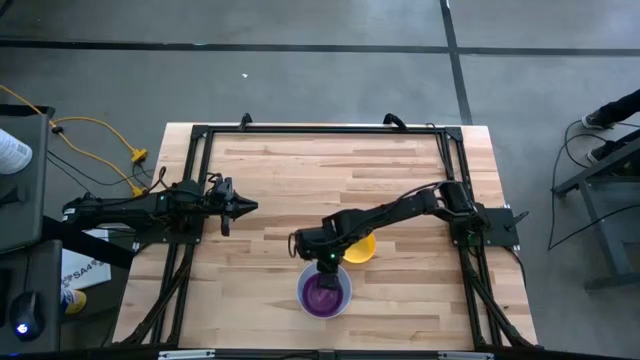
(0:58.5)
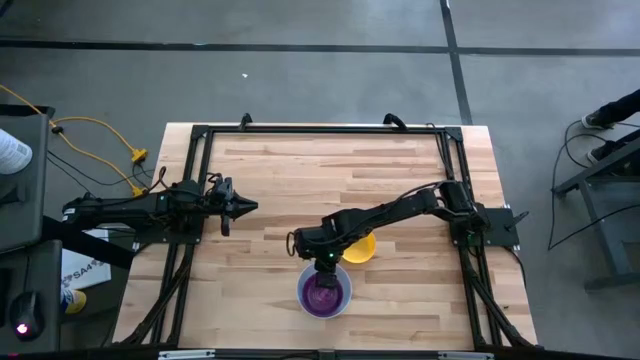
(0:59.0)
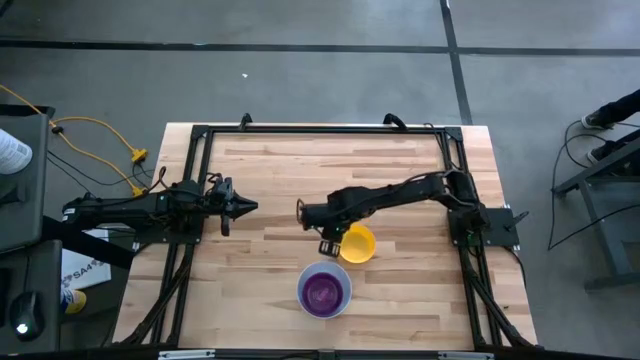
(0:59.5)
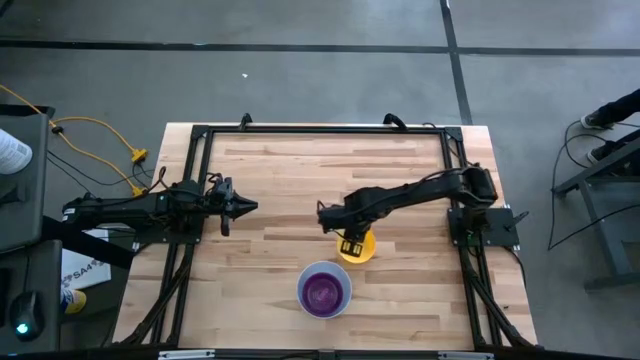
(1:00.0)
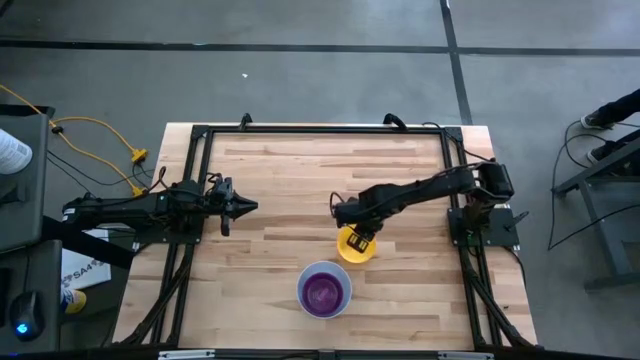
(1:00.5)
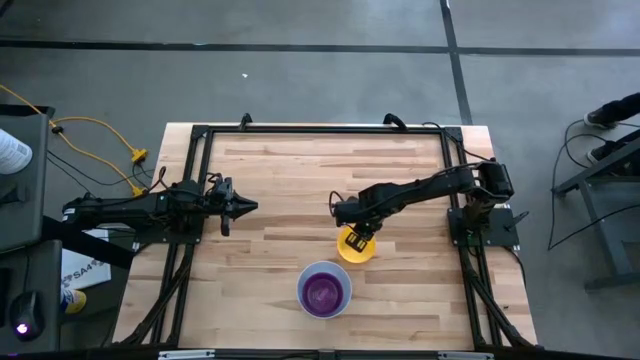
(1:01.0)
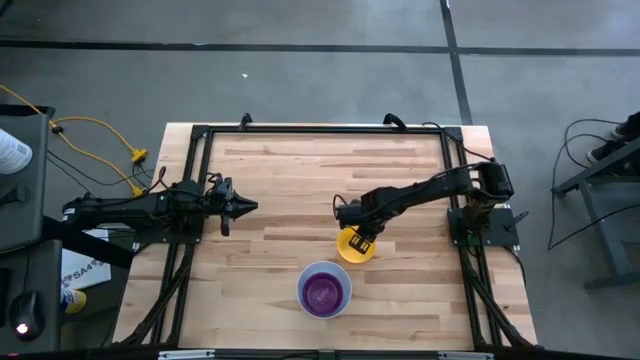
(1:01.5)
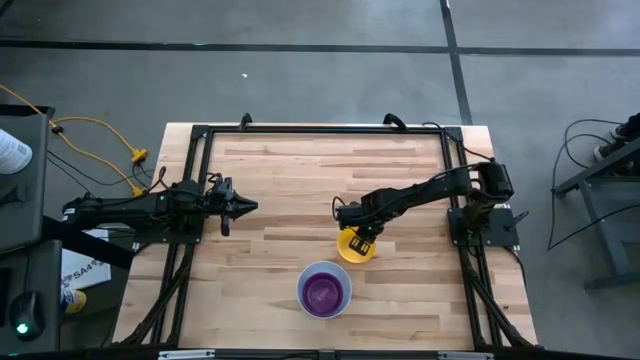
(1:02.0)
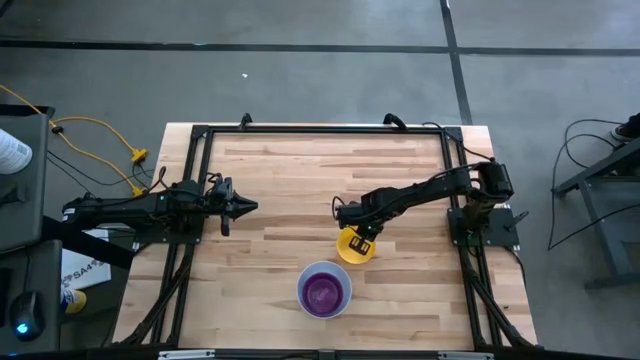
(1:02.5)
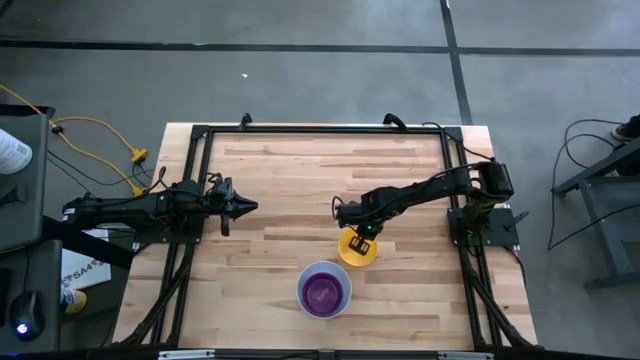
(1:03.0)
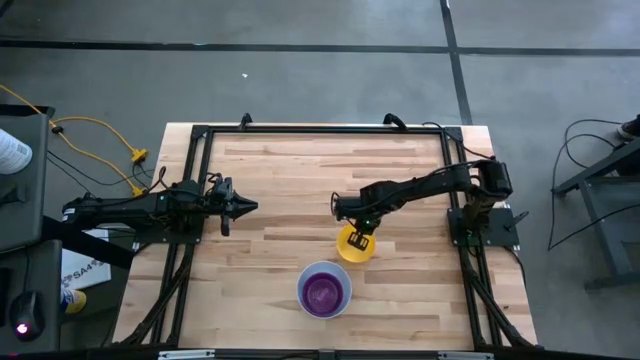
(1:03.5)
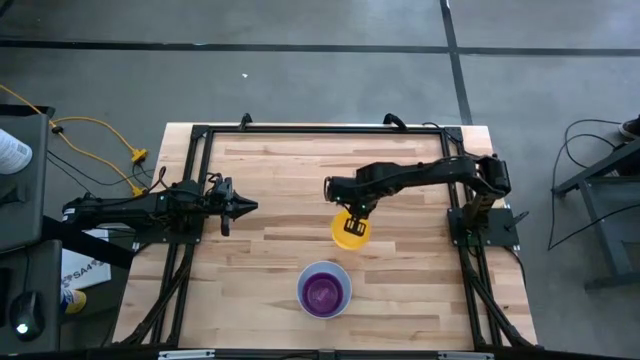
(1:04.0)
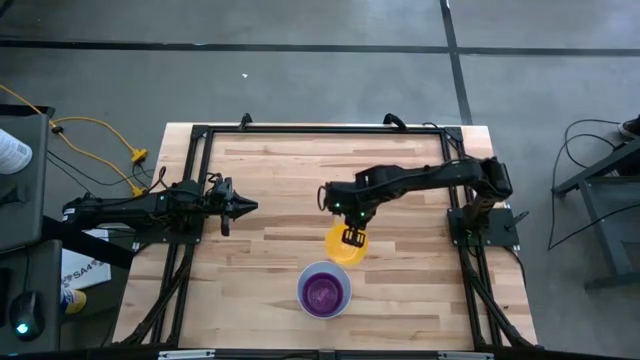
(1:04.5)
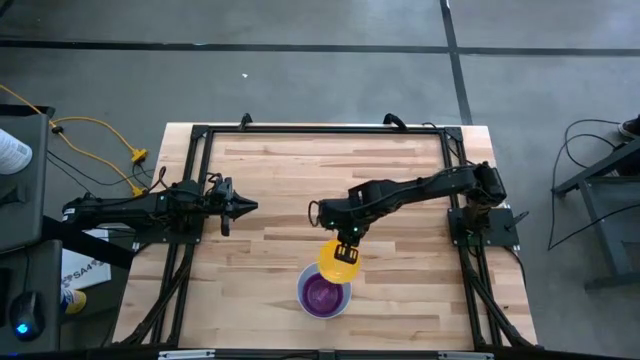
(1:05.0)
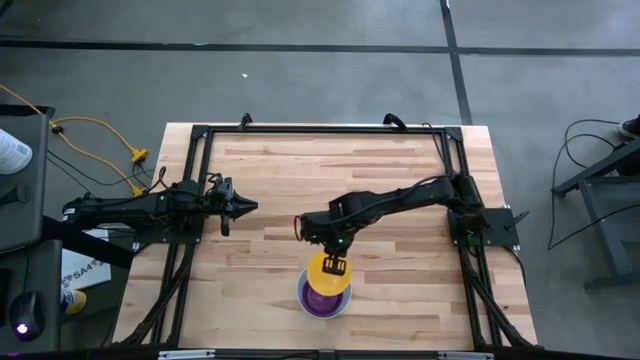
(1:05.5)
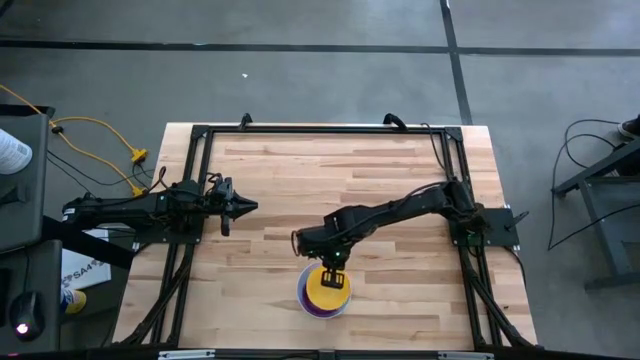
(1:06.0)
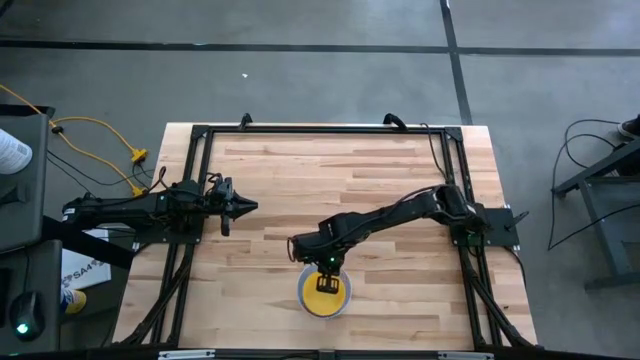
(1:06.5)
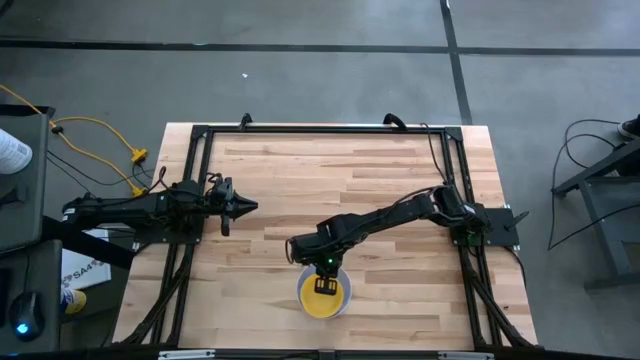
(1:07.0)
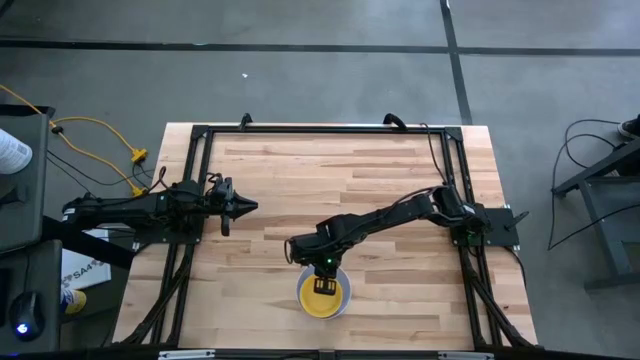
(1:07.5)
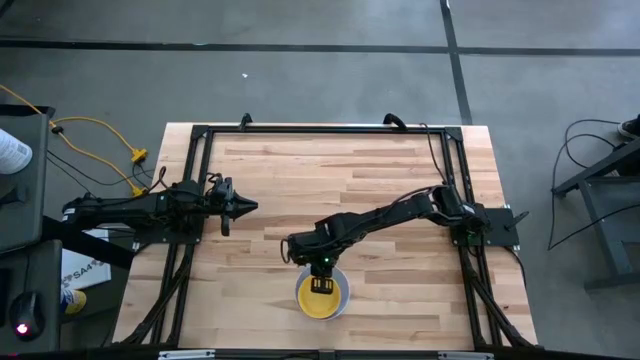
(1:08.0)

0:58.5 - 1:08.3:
Stack the yellow bowl on top of the purple bowl

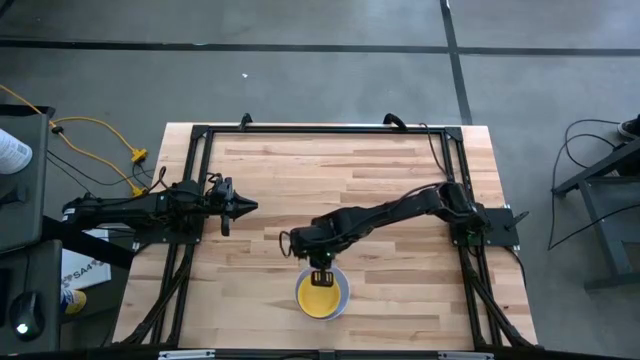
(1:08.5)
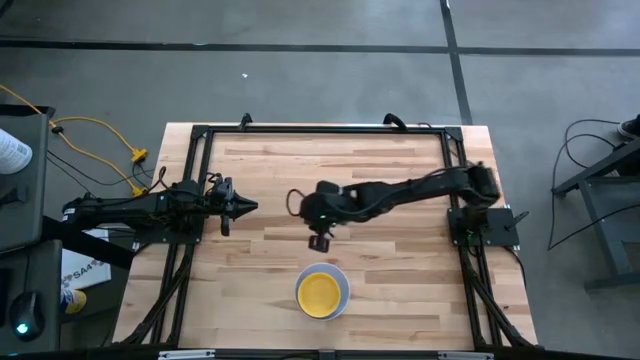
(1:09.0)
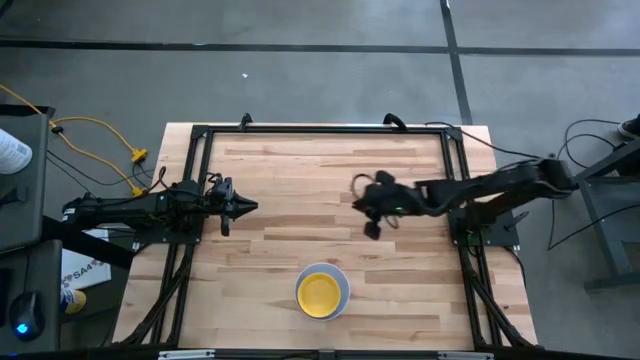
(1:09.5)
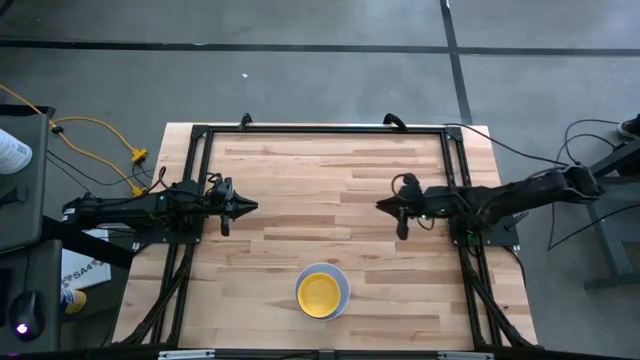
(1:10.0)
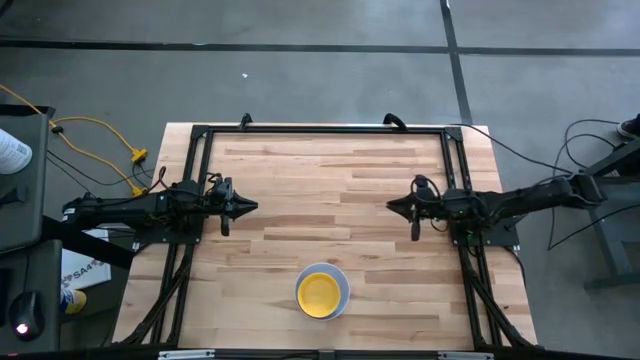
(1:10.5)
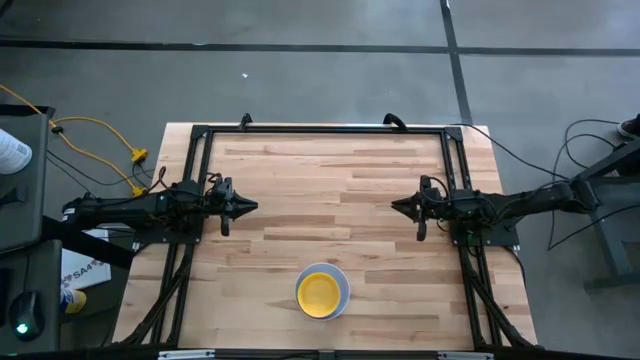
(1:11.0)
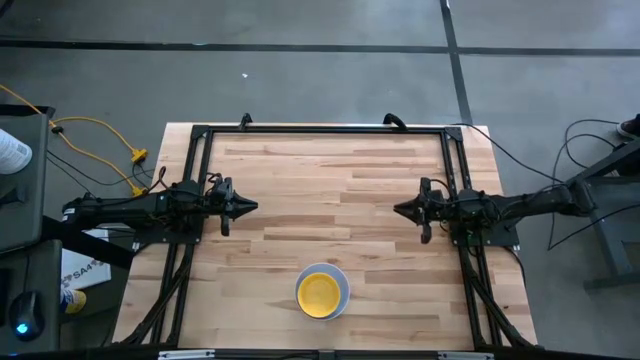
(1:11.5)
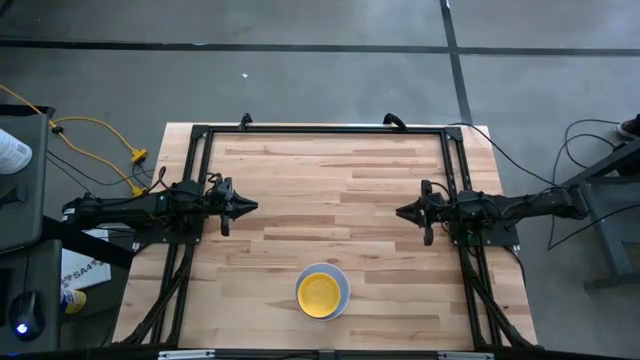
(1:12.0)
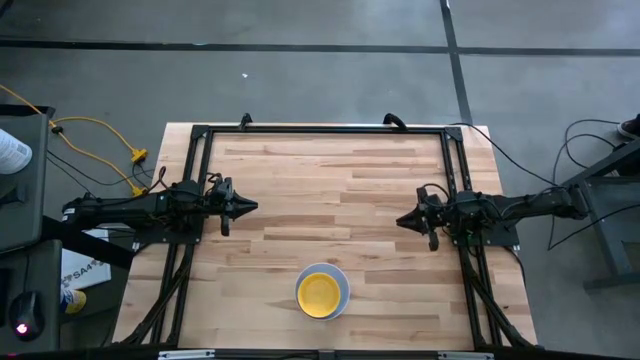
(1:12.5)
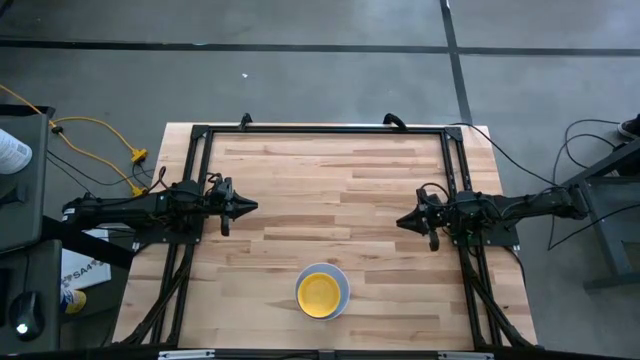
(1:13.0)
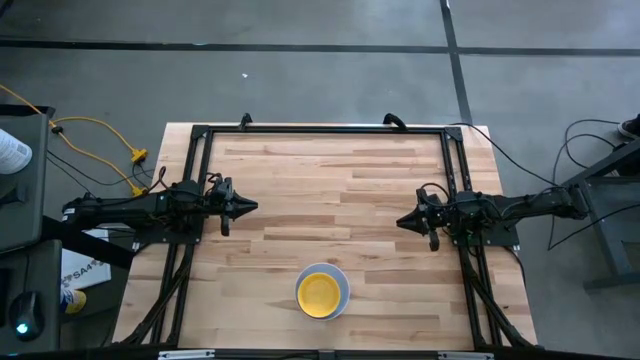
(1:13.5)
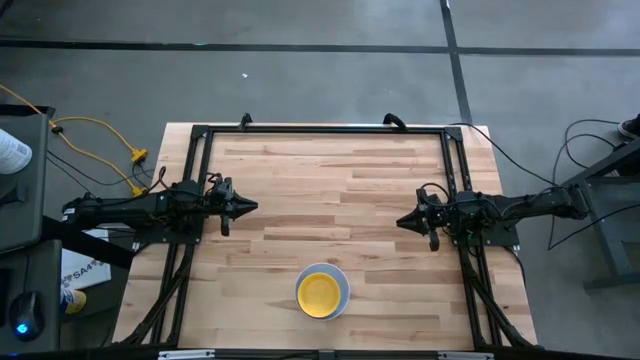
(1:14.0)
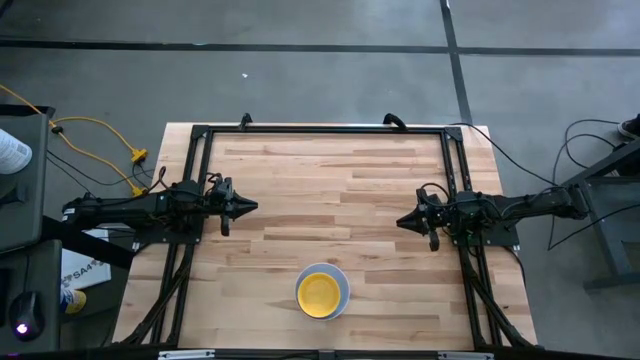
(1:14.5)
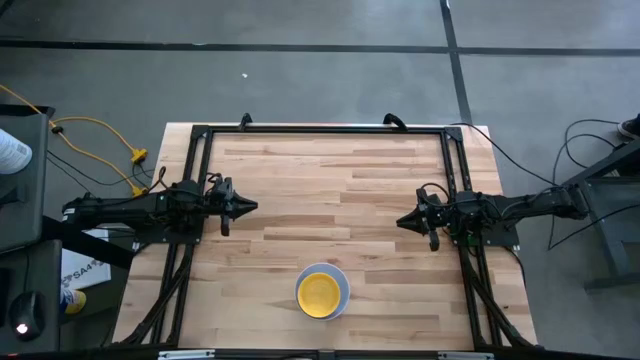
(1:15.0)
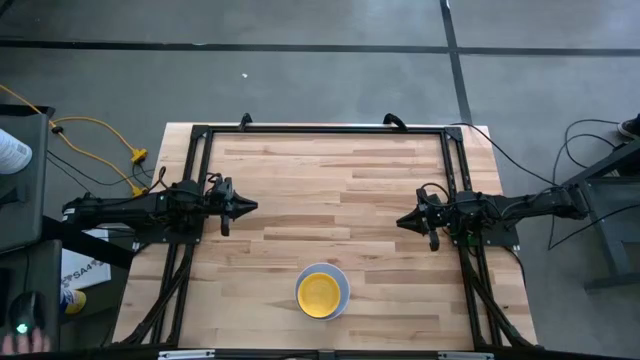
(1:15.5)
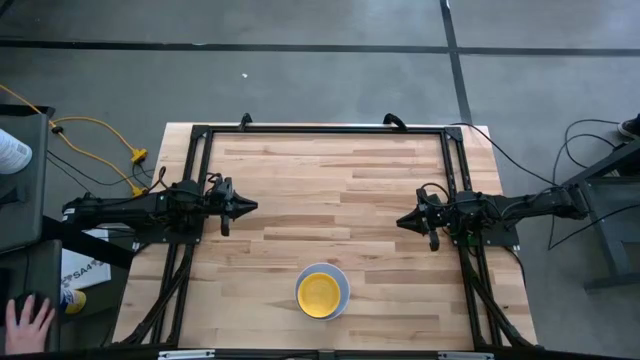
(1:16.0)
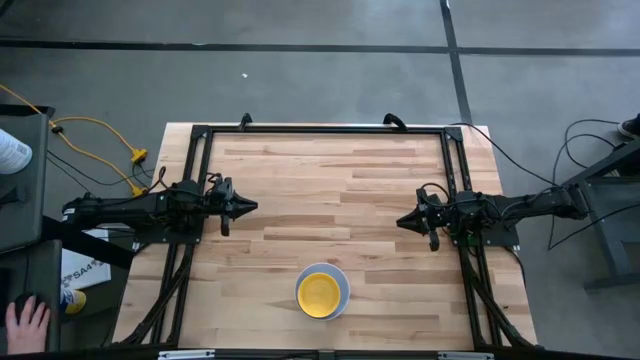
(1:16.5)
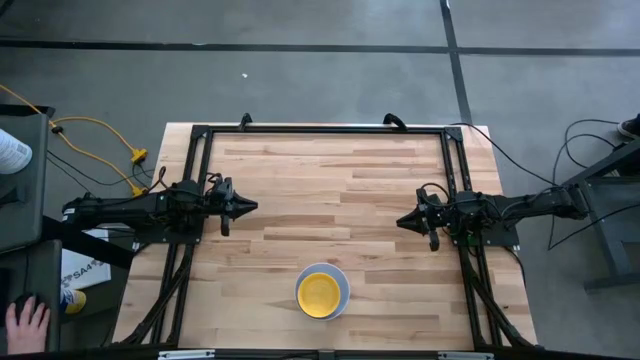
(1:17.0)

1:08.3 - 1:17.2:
Return to Home Position

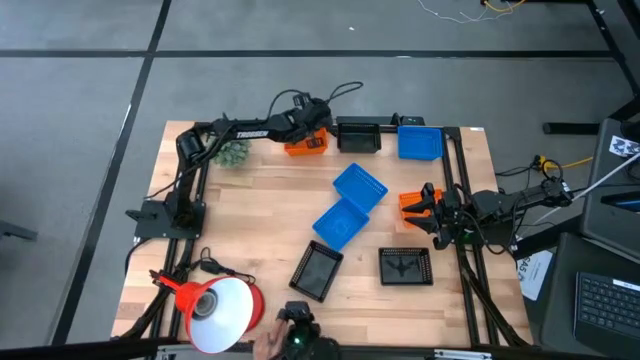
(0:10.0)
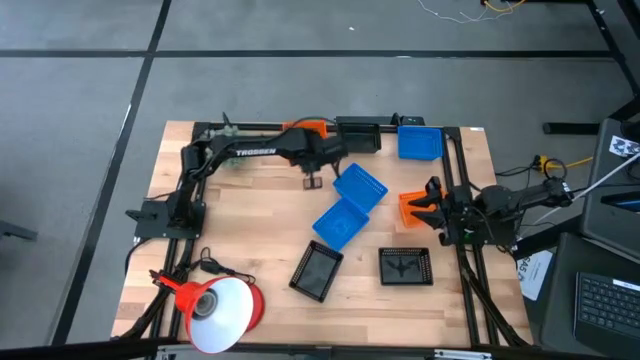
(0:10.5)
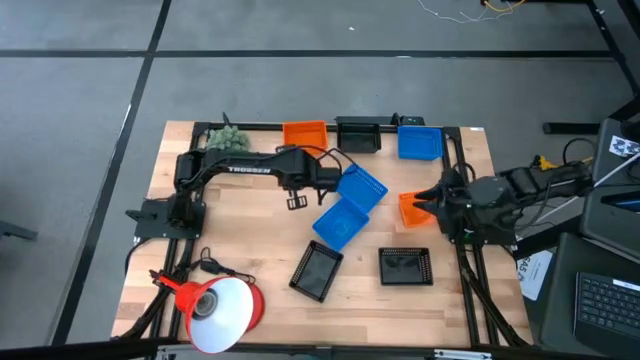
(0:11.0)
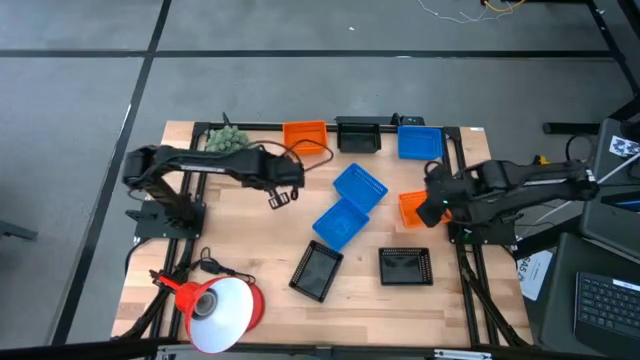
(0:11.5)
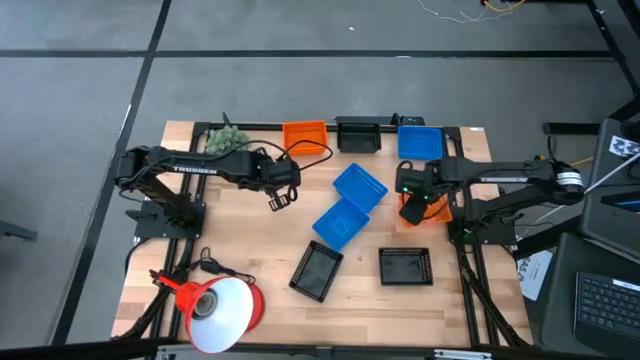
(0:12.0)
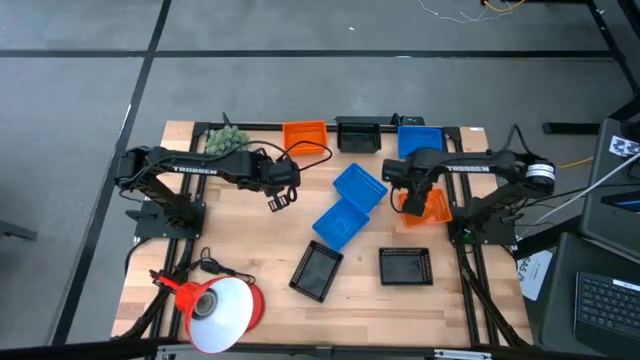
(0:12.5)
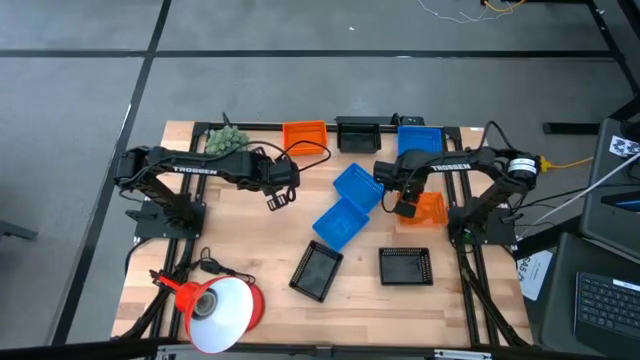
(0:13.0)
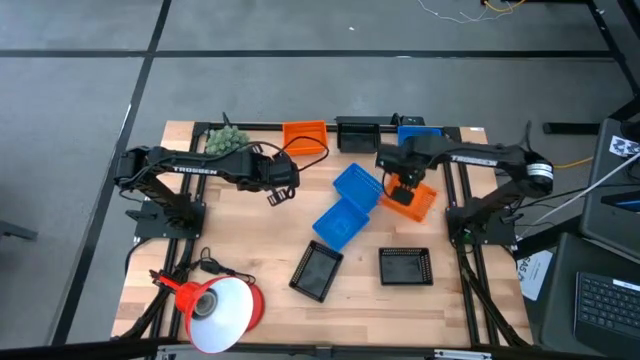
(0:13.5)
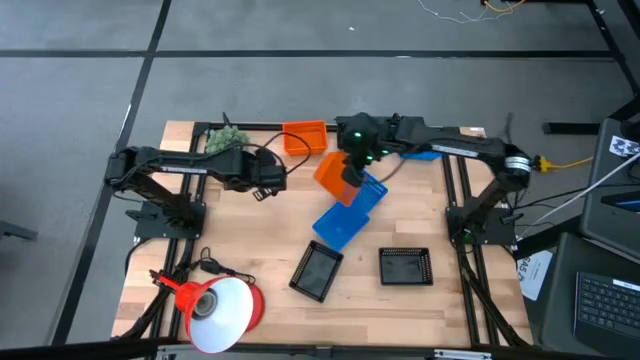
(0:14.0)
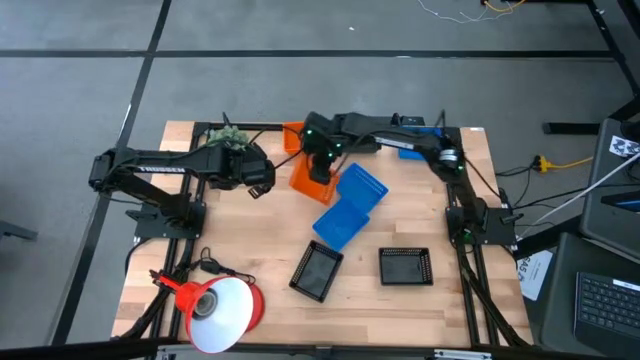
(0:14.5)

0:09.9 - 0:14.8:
Move the right orange bin to the top left of the table
